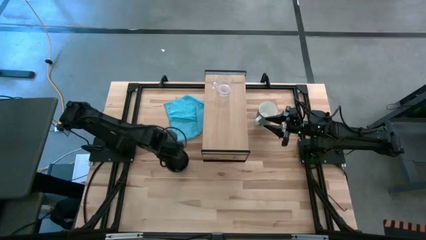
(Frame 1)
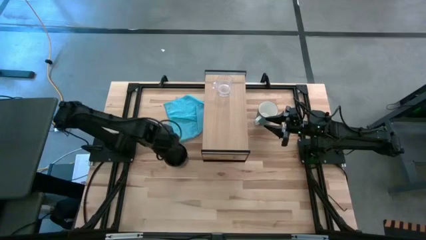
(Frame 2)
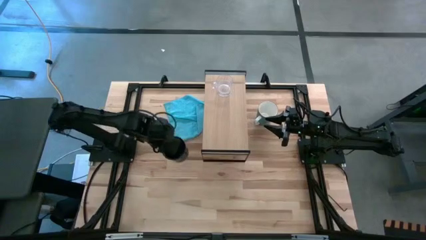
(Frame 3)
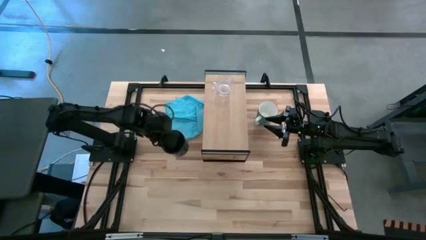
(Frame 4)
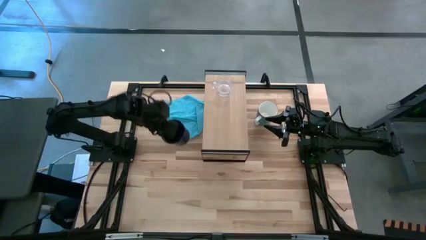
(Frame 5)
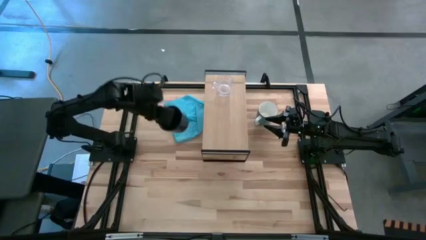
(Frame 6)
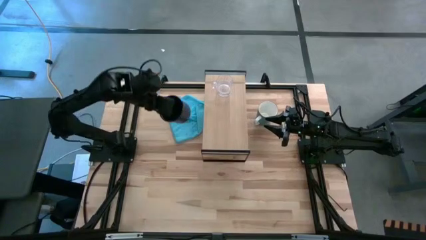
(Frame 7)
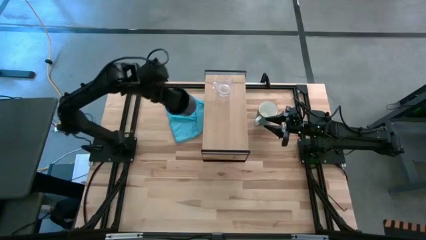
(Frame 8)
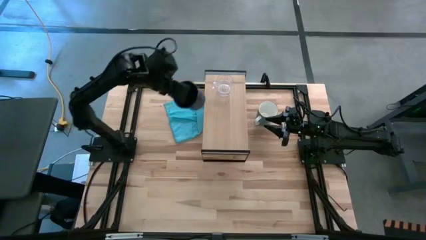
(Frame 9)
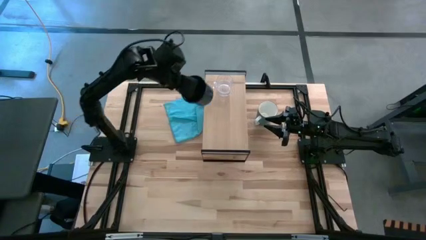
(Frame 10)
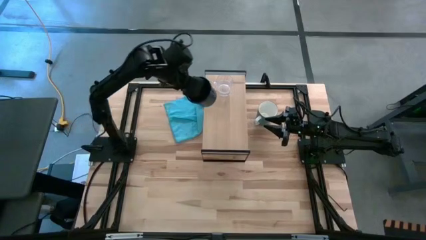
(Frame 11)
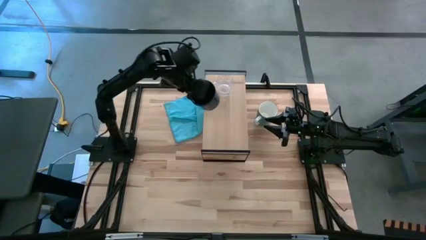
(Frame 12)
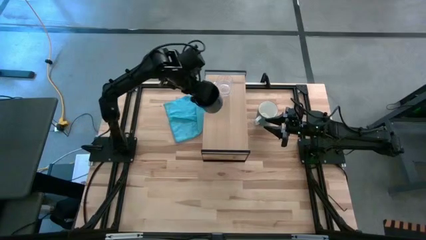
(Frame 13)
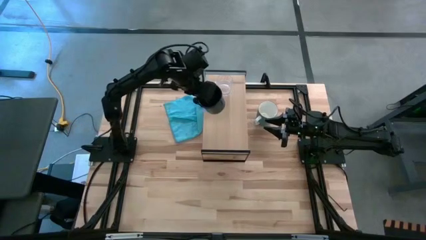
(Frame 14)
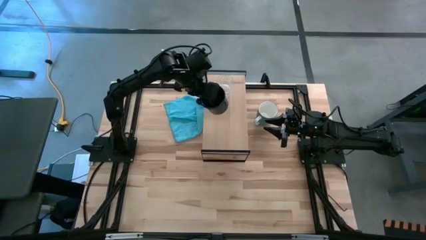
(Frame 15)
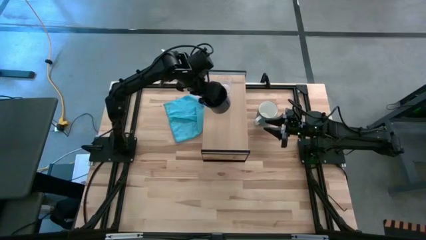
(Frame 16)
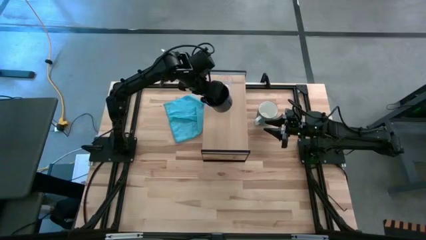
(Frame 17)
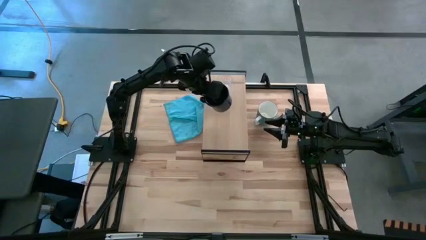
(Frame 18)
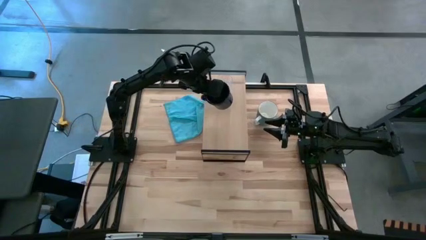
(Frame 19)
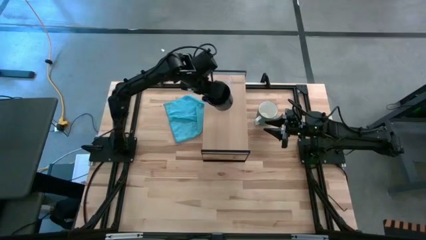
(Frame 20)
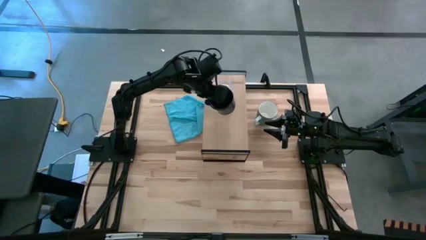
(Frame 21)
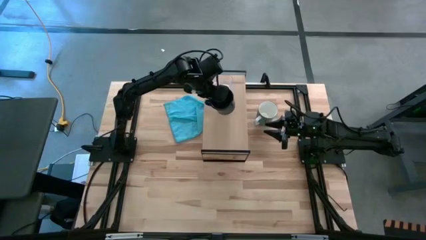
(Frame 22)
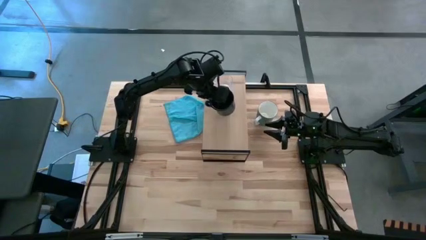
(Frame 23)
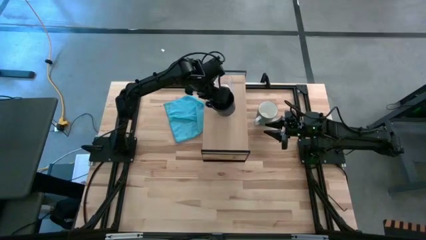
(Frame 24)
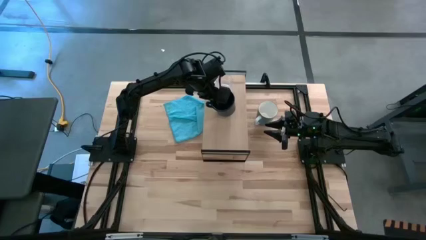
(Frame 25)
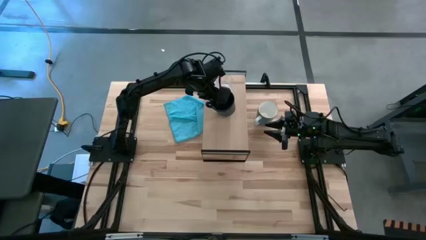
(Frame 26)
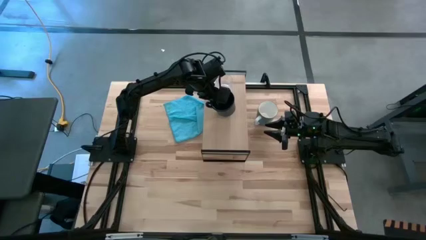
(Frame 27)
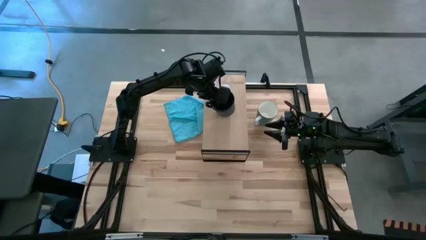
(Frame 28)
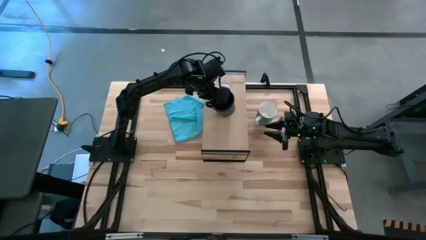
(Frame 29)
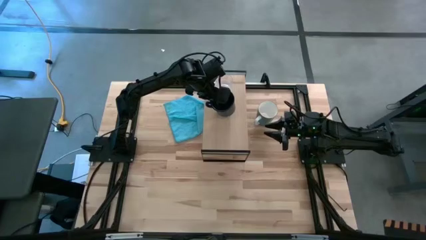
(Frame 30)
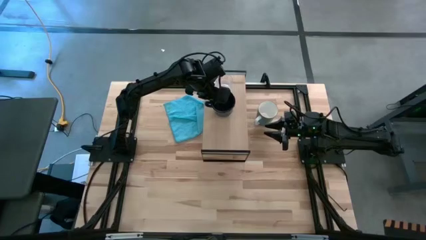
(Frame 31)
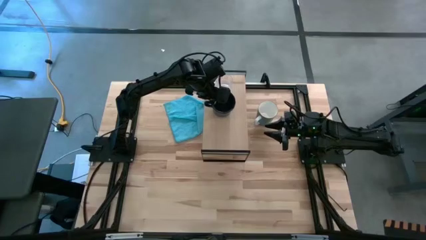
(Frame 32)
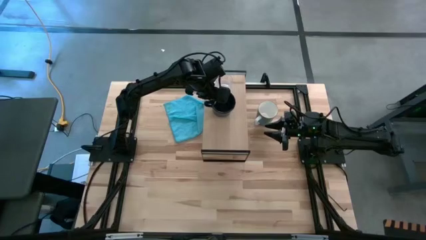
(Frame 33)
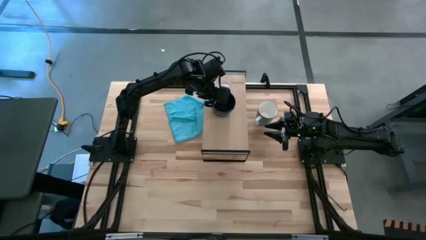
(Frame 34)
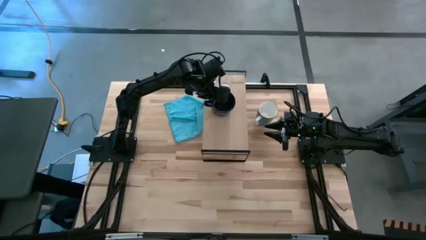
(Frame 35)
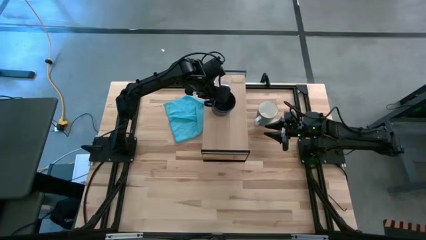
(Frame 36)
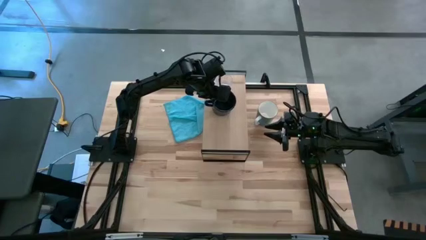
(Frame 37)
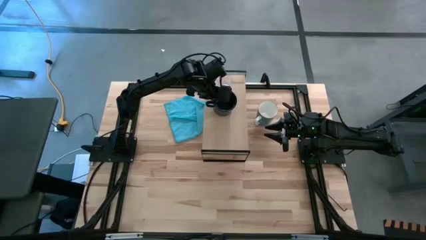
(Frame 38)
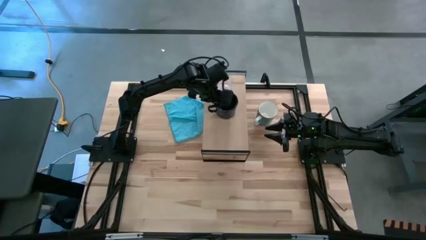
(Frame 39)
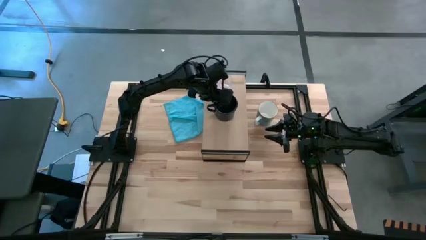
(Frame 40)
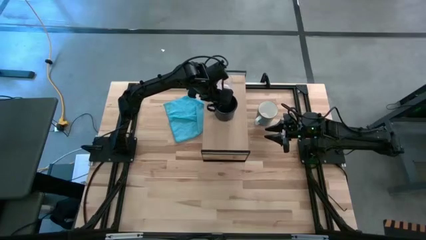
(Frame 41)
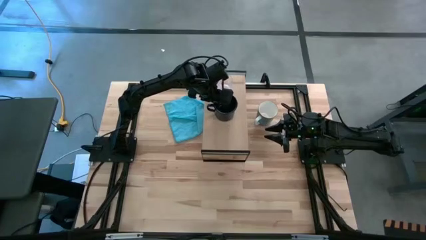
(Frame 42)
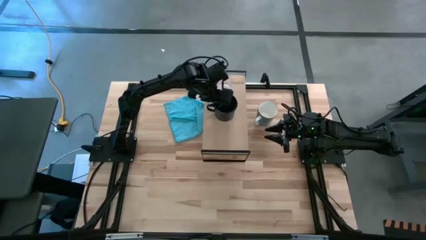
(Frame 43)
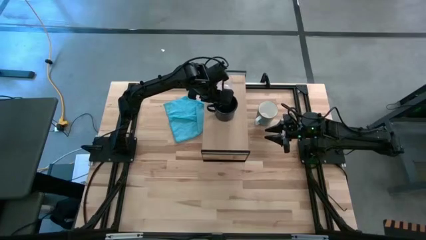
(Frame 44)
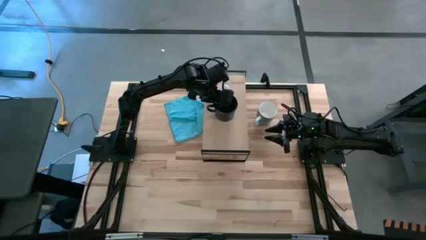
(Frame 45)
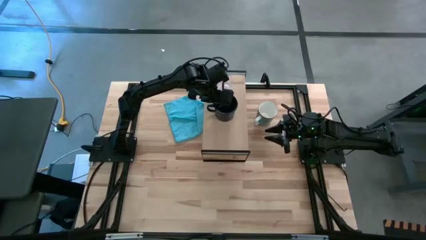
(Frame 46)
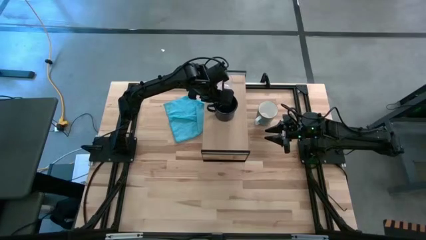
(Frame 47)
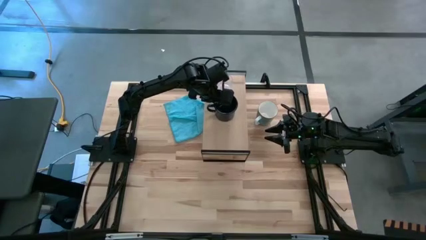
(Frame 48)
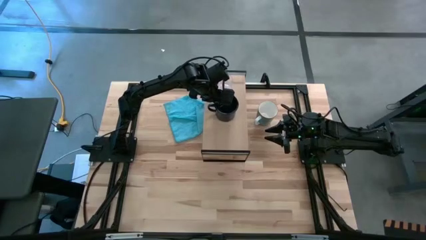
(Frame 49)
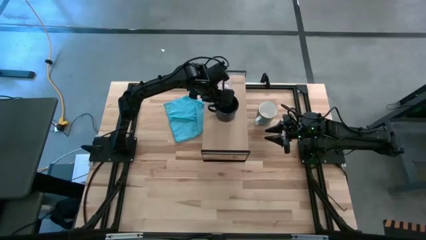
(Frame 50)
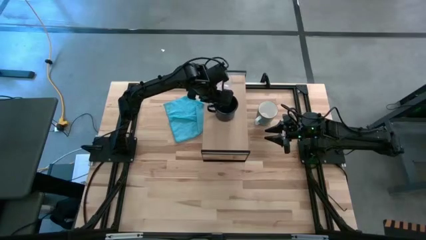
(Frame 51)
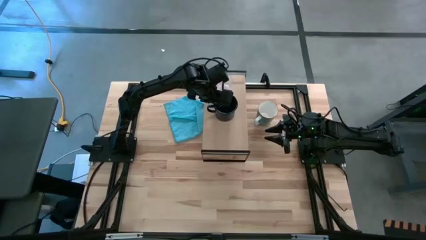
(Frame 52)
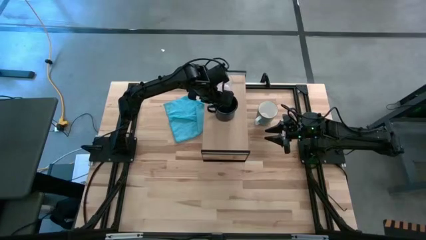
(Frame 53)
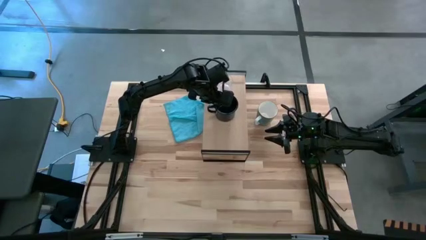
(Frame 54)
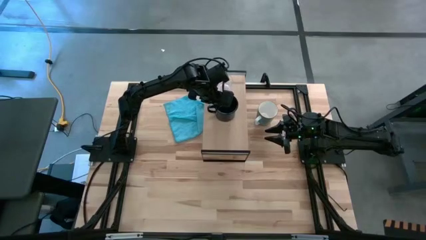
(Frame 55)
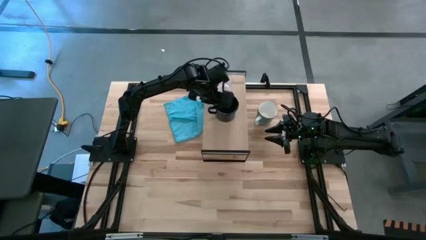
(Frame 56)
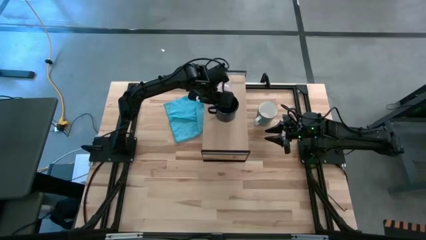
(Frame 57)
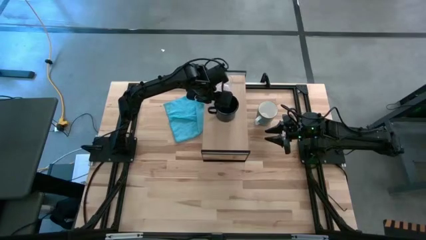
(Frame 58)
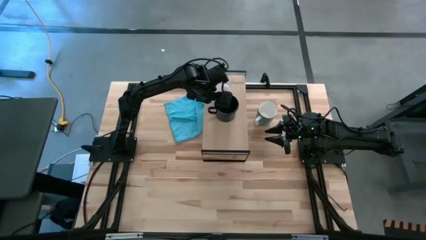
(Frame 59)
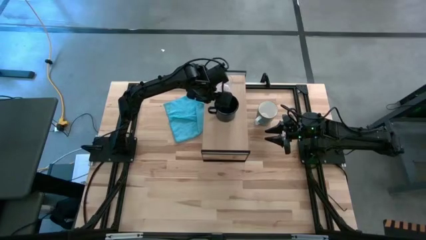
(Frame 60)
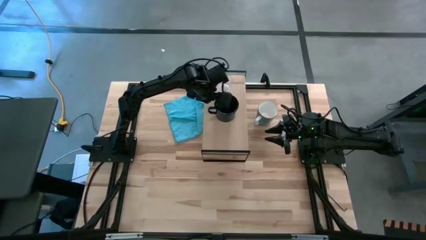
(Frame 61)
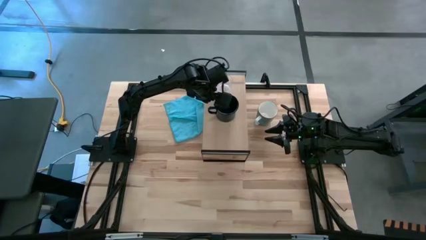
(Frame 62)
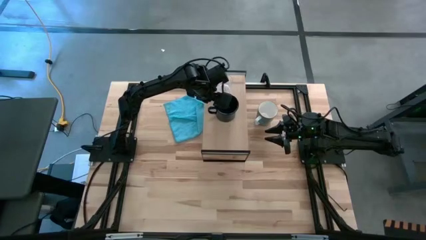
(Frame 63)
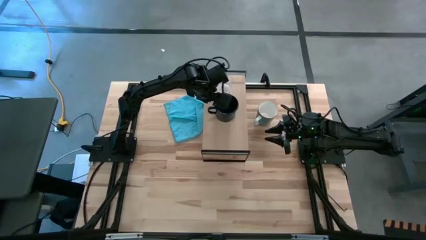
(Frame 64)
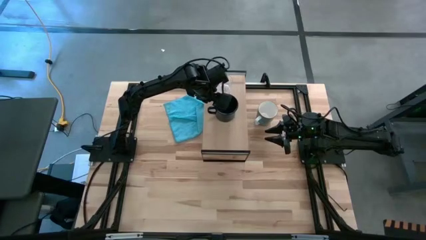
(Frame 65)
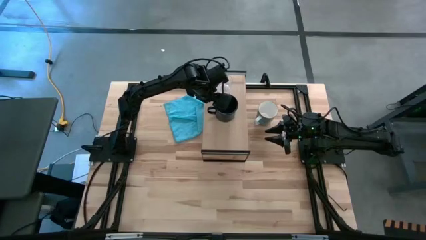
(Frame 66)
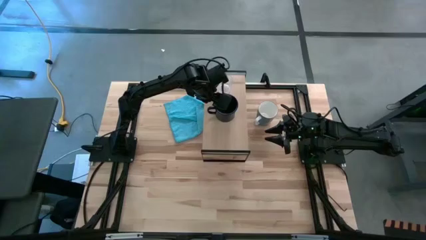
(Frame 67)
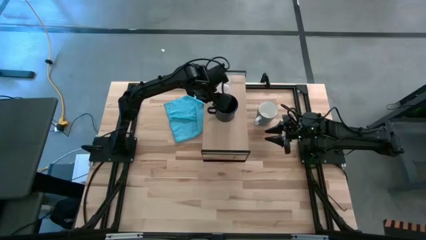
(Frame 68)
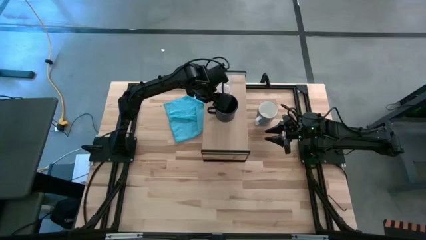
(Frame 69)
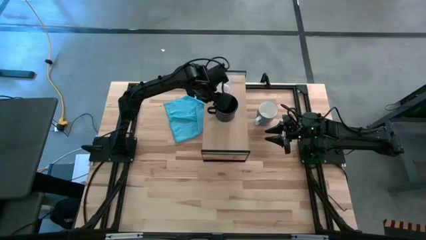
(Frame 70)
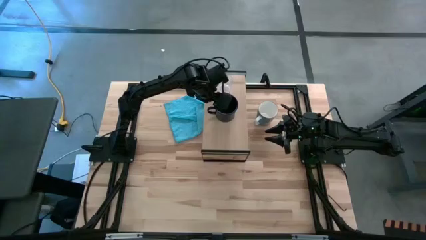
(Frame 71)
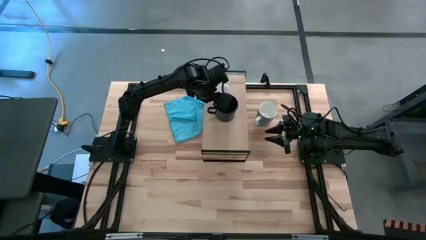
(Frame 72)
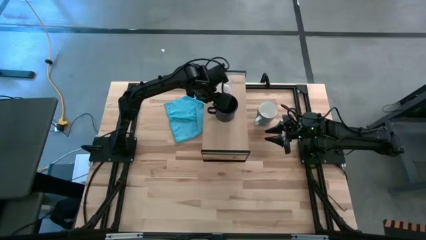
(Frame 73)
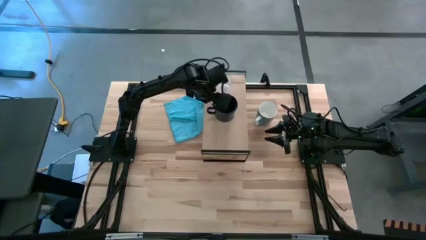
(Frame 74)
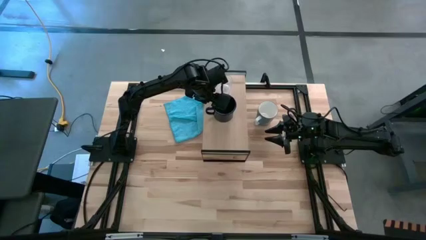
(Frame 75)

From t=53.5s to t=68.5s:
Task: Stack small to large cups/mugs on shelf
Put the dark blue mug on the shelf
